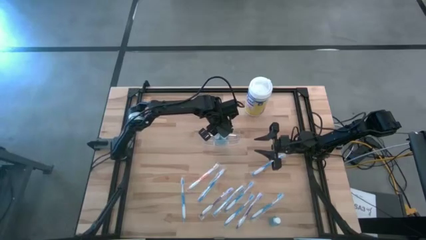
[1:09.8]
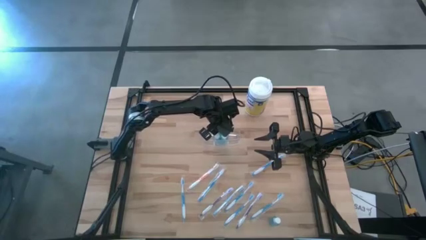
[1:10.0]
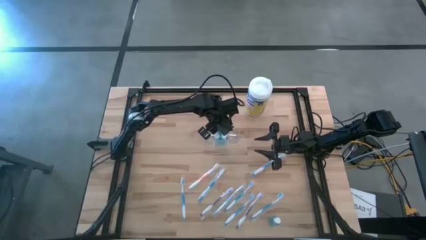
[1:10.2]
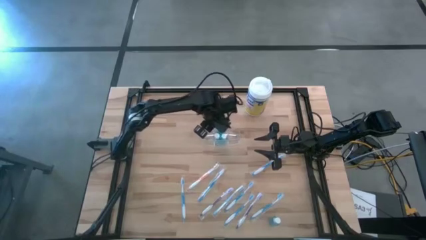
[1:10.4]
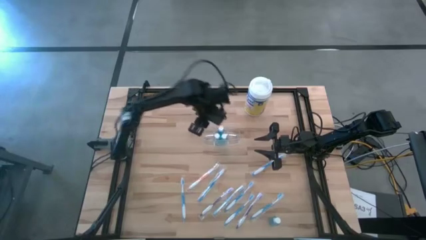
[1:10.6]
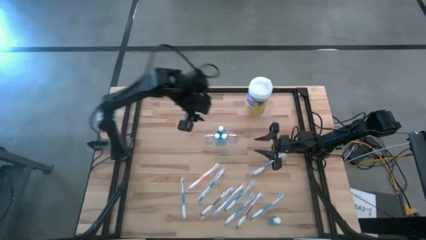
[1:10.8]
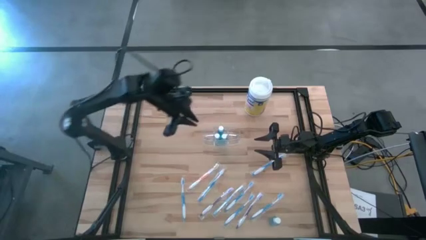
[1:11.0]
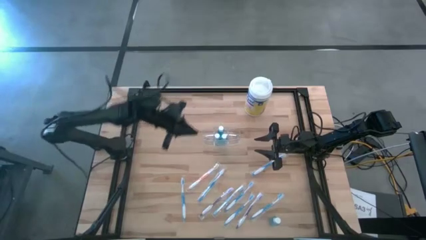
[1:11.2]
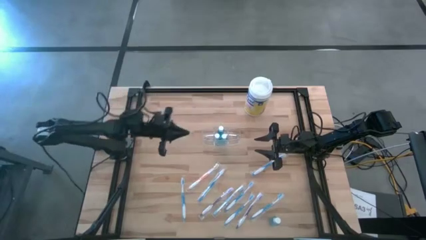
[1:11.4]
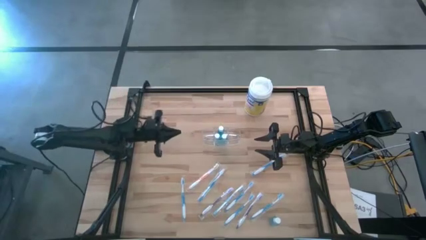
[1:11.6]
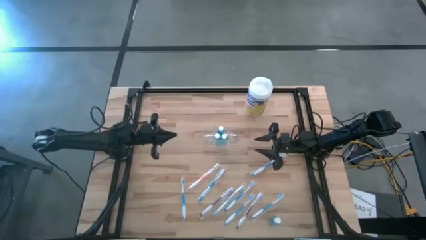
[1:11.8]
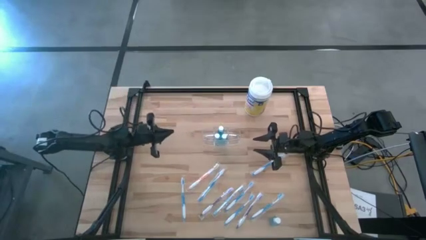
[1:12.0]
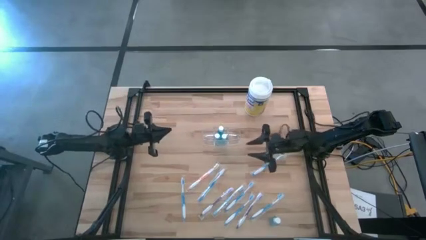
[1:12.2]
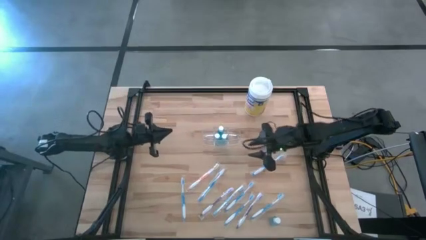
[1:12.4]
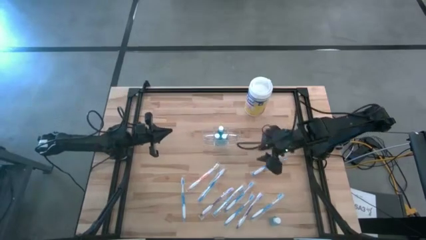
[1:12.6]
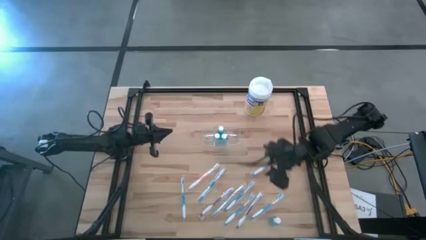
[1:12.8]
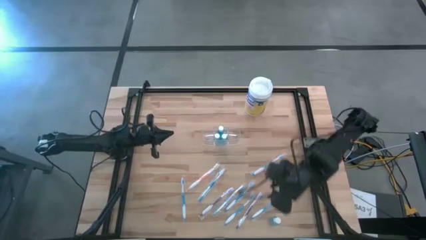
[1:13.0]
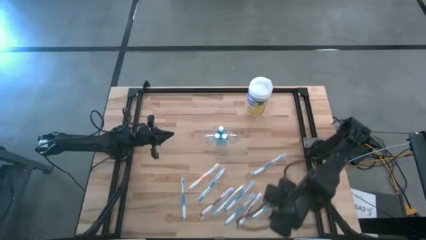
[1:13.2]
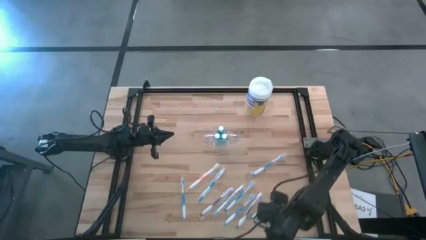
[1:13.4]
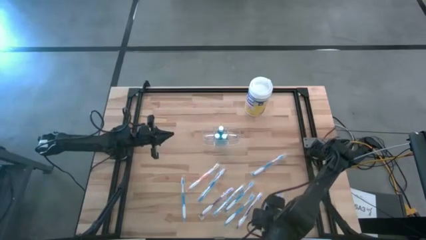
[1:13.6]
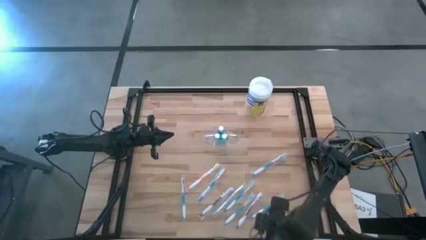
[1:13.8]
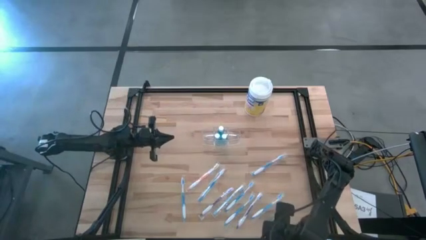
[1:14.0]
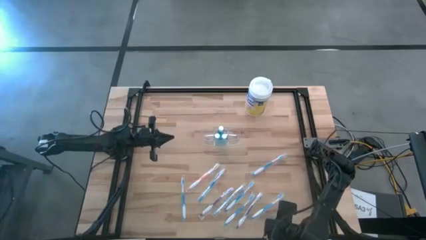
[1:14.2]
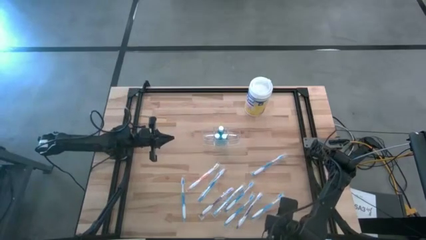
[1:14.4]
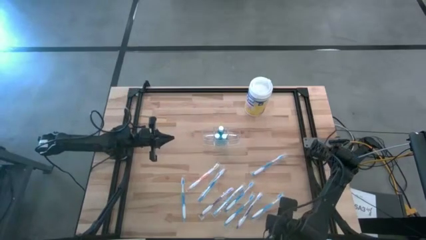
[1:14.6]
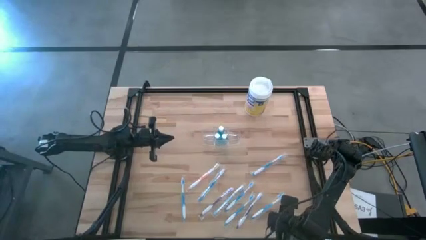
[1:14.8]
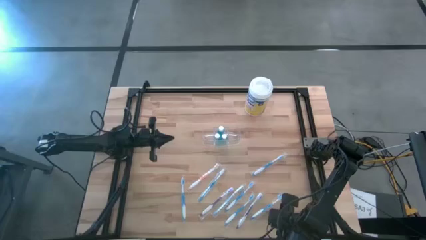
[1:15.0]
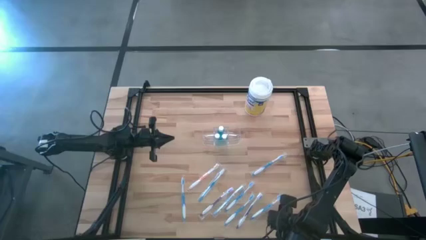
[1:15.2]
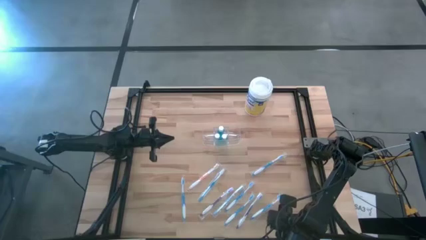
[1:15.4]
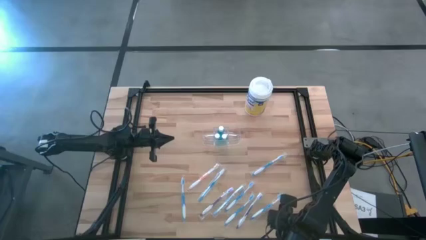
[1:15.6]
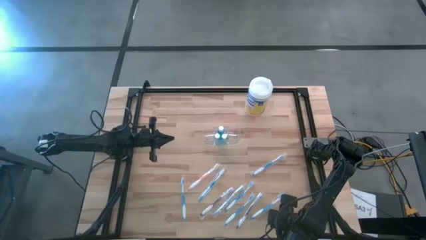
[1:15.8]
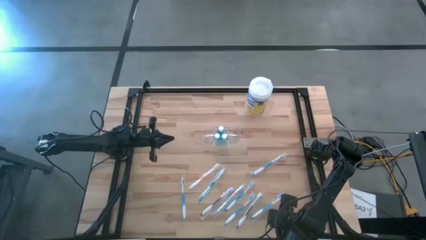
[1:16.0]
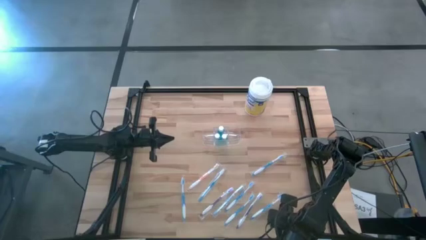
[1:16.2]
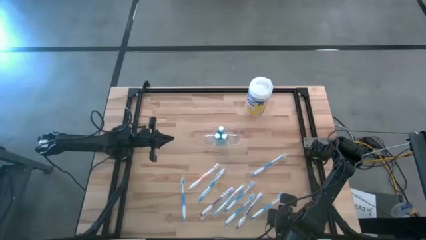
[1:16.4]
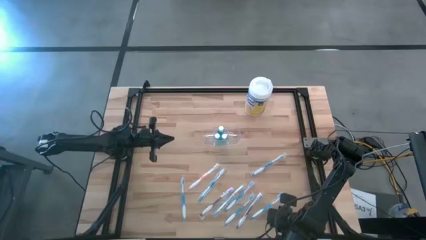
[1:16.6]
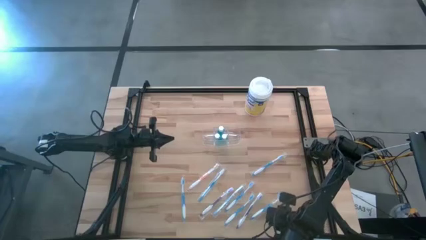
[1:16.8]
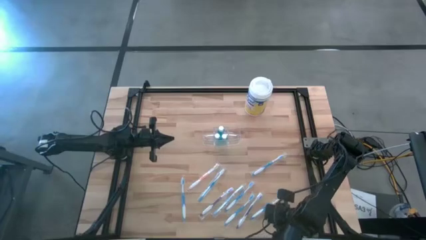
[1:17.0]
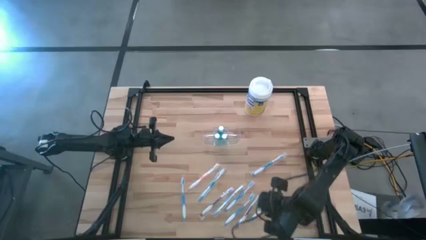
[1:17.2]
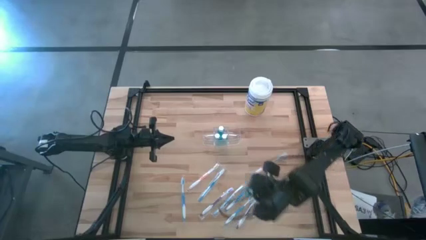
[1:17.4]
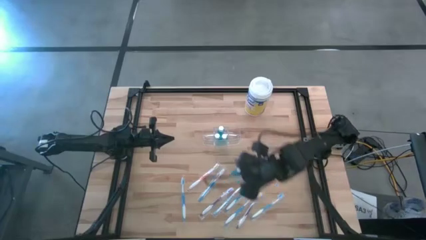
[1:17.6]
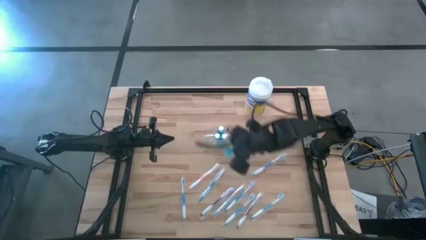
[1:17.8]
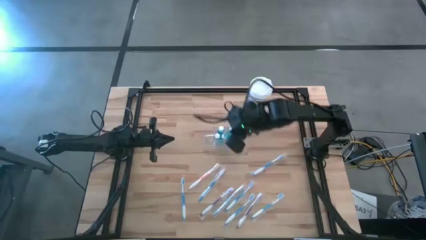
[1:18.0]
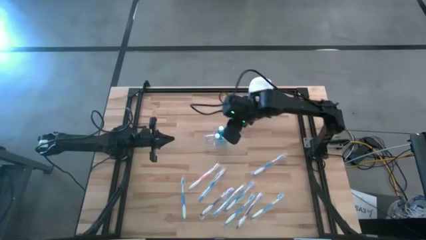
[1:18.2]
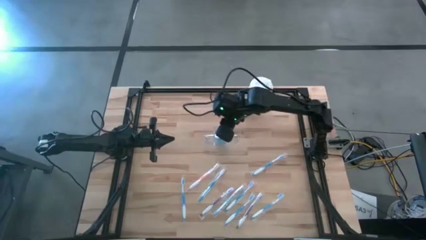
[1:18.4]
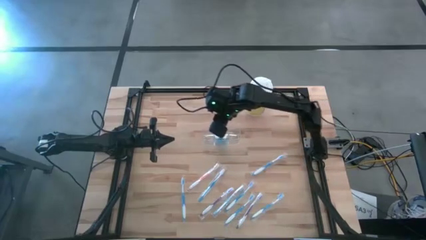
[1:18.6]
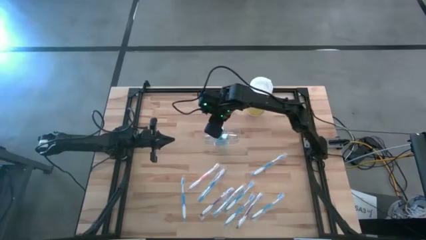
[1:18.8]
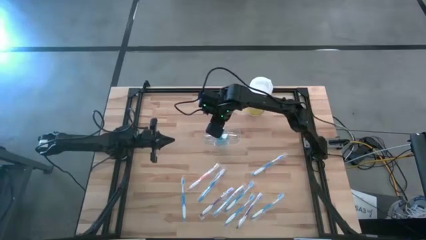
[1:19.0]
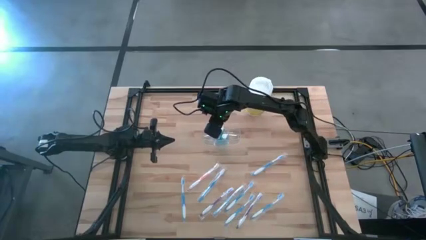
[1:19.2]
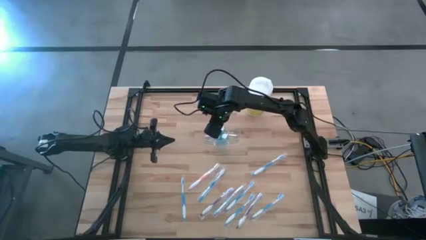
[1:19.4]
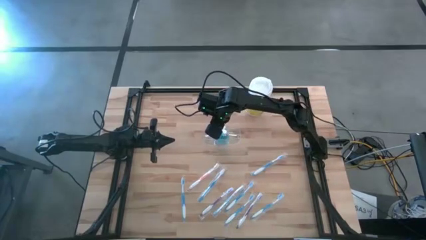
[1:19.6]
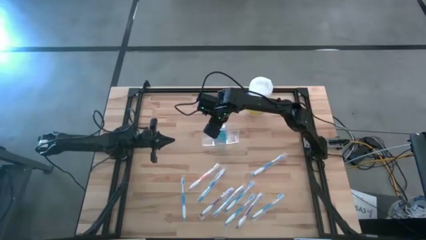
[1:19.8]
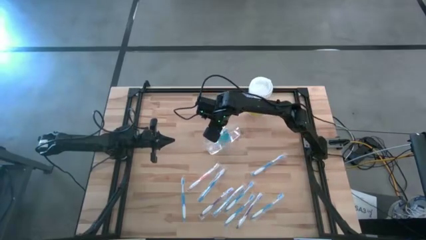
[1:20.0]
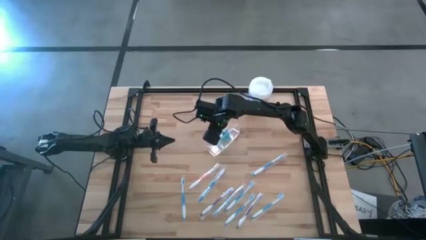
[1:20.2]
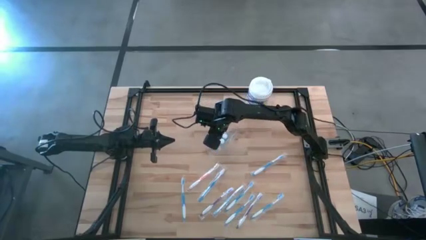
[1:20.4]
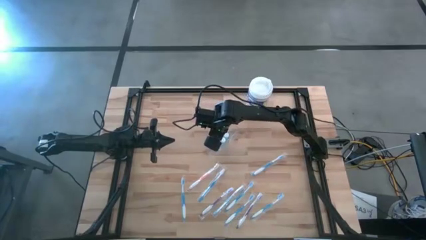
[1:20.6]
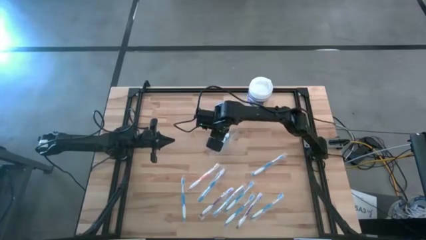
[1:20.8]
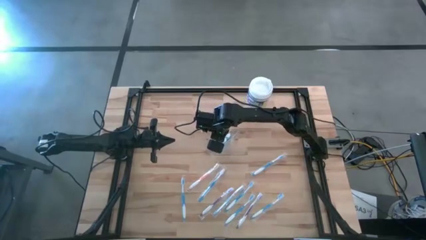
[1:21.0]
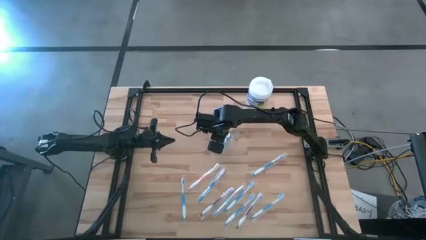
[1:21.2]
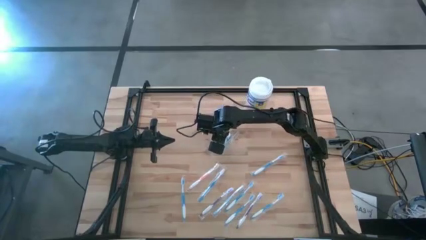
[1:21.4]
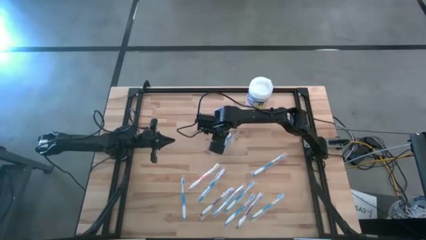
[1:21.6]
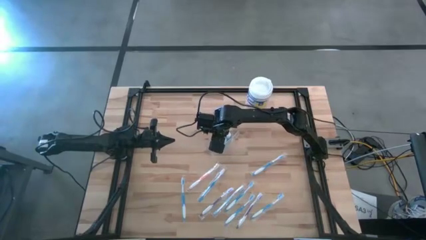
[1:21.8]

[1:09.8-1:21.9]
Task: Pick & Place toothbrushing station
Put the blue mouthwash into the transparent organizer
